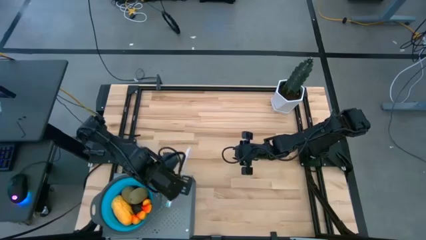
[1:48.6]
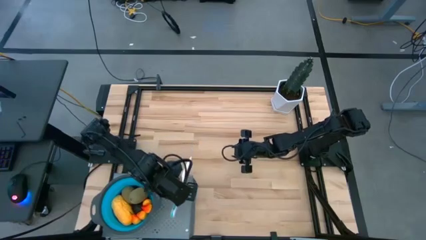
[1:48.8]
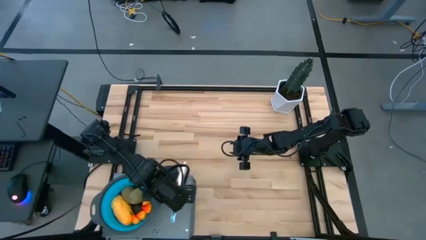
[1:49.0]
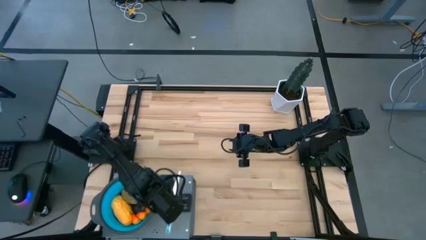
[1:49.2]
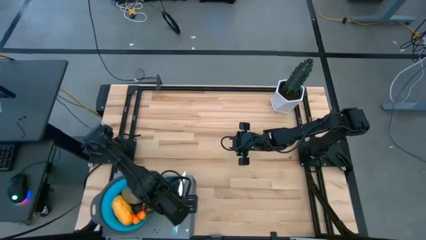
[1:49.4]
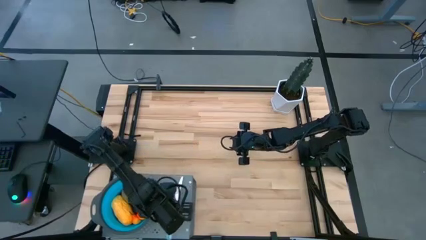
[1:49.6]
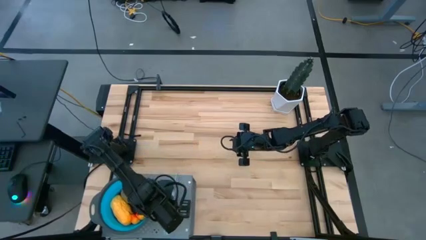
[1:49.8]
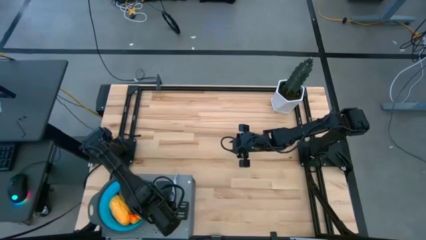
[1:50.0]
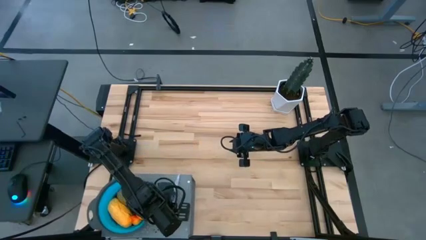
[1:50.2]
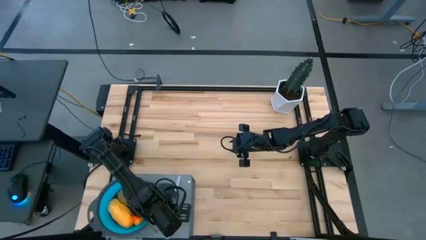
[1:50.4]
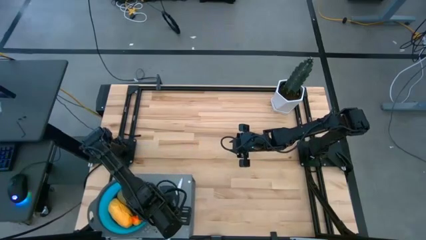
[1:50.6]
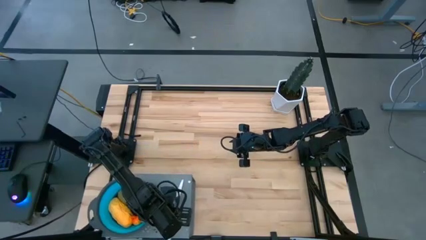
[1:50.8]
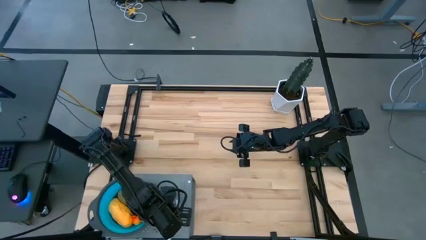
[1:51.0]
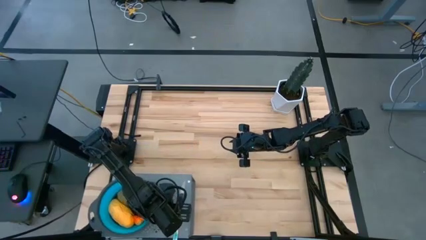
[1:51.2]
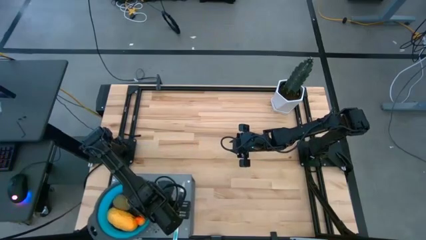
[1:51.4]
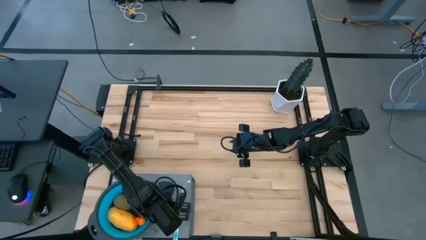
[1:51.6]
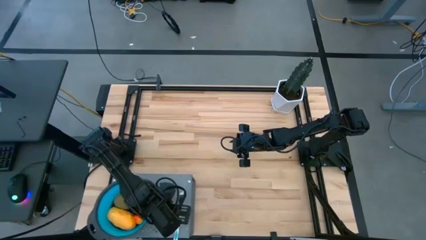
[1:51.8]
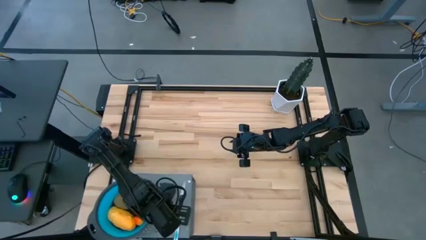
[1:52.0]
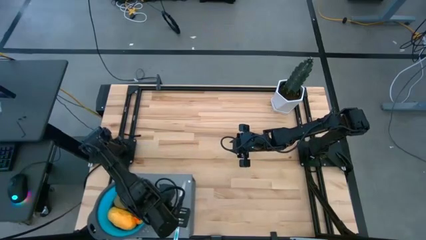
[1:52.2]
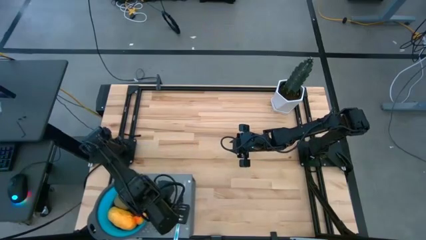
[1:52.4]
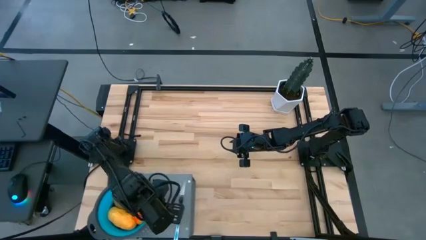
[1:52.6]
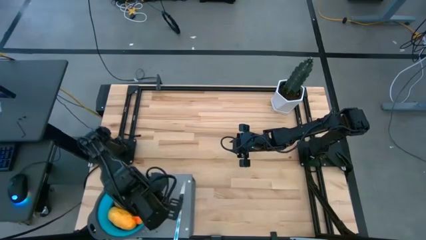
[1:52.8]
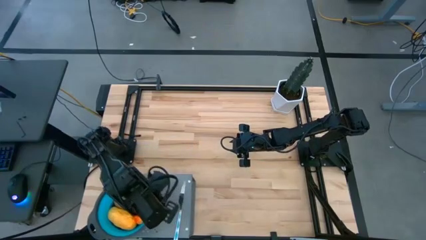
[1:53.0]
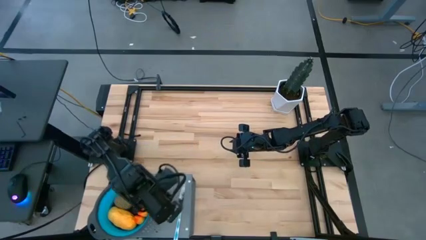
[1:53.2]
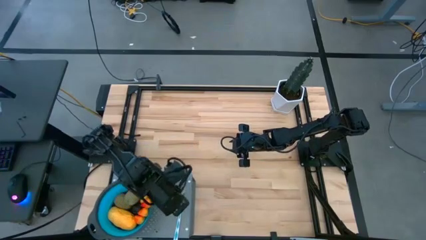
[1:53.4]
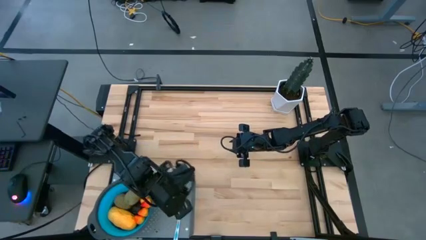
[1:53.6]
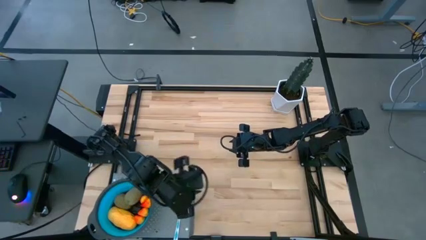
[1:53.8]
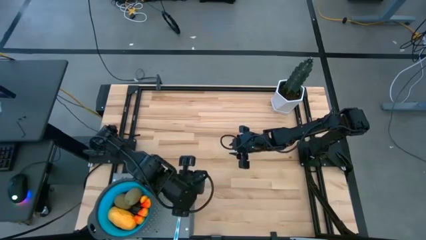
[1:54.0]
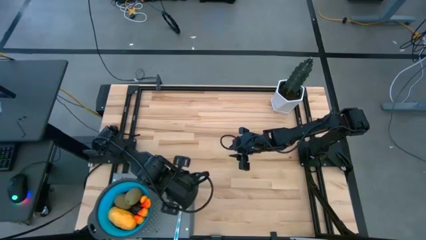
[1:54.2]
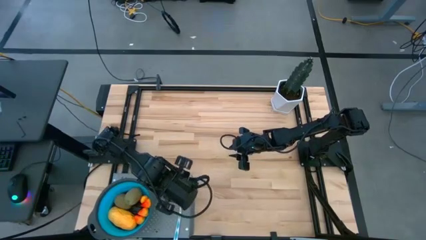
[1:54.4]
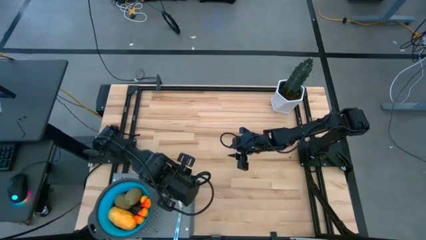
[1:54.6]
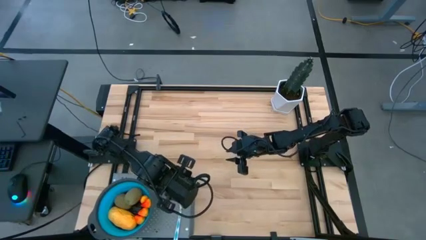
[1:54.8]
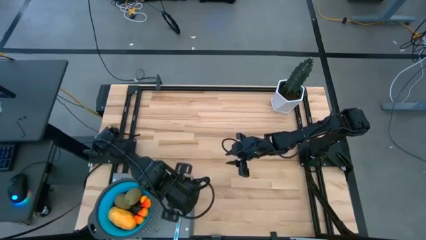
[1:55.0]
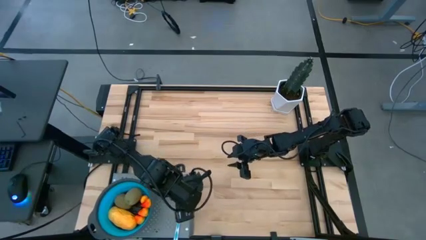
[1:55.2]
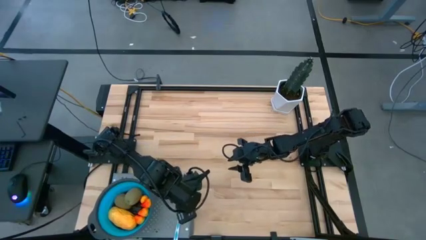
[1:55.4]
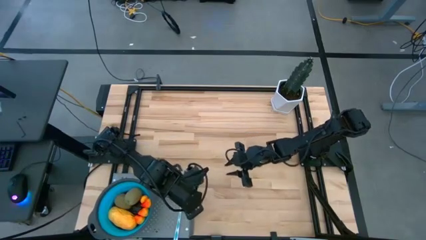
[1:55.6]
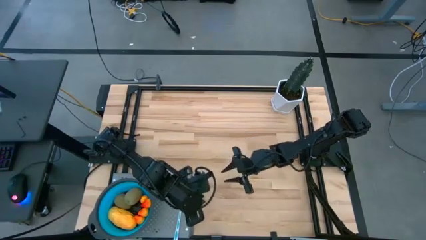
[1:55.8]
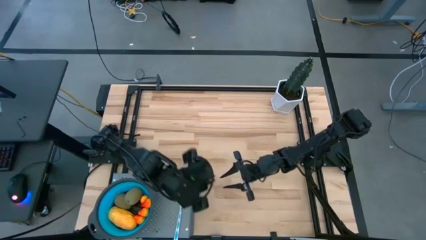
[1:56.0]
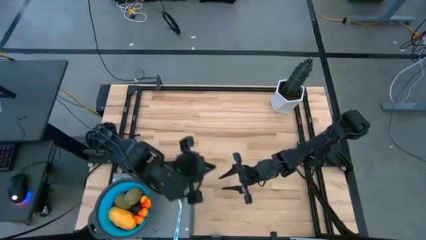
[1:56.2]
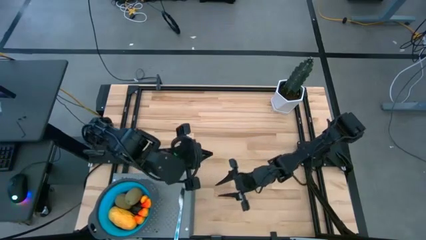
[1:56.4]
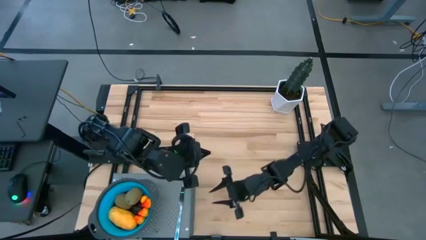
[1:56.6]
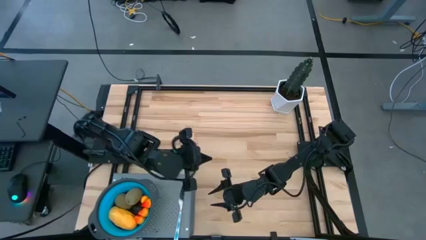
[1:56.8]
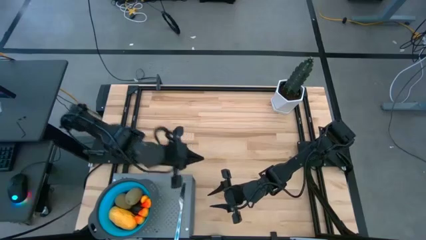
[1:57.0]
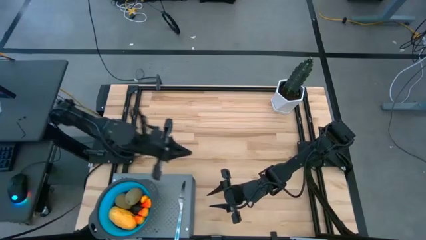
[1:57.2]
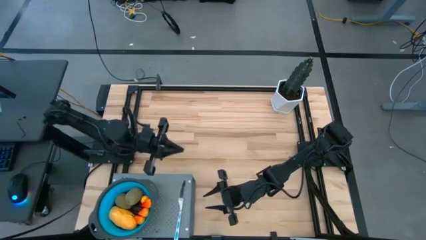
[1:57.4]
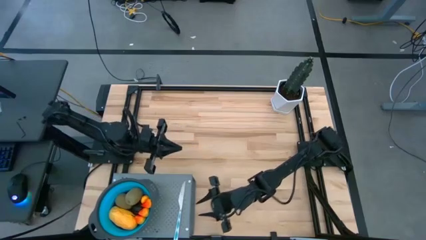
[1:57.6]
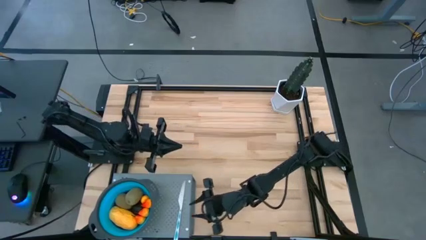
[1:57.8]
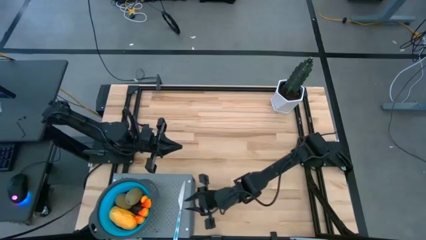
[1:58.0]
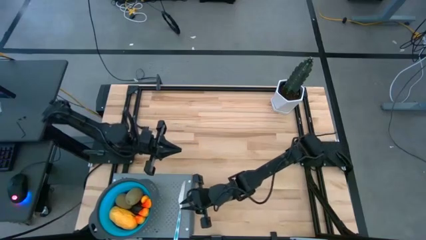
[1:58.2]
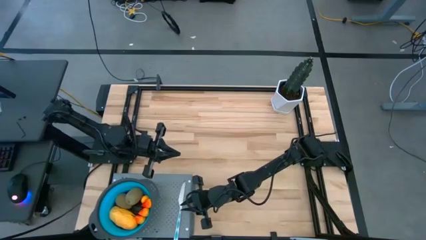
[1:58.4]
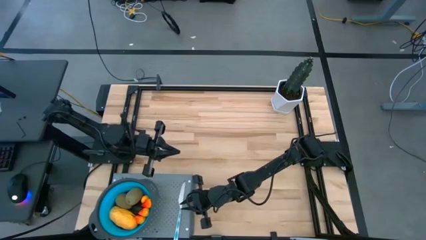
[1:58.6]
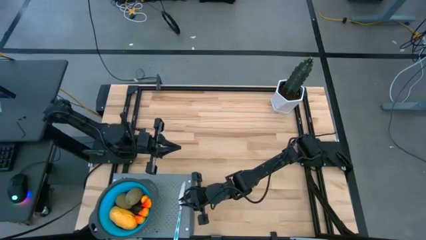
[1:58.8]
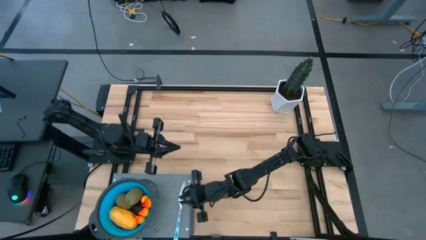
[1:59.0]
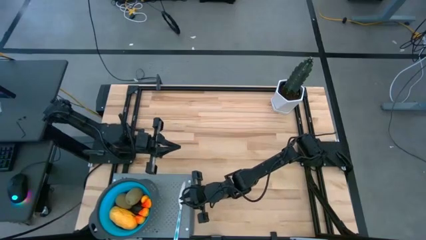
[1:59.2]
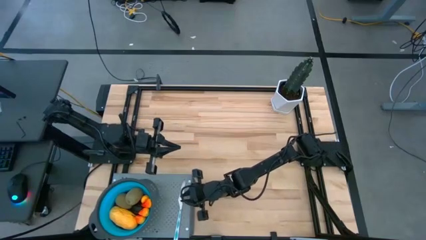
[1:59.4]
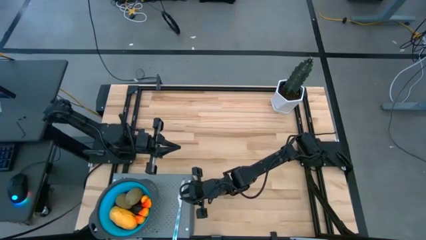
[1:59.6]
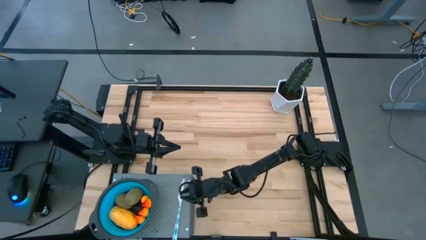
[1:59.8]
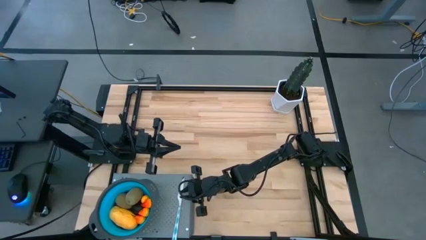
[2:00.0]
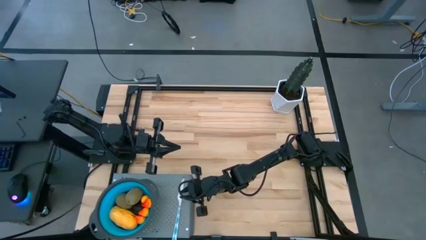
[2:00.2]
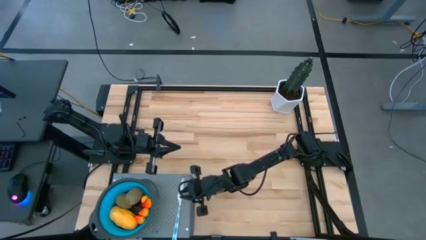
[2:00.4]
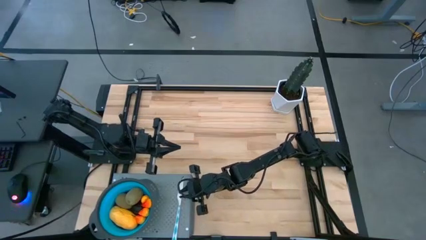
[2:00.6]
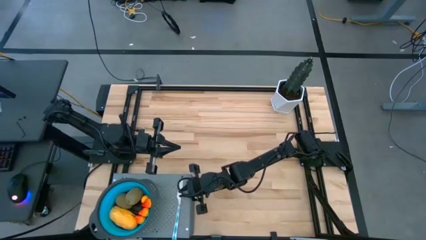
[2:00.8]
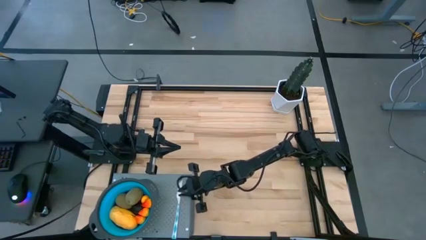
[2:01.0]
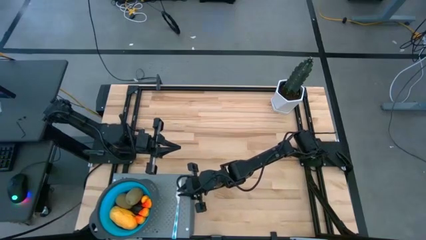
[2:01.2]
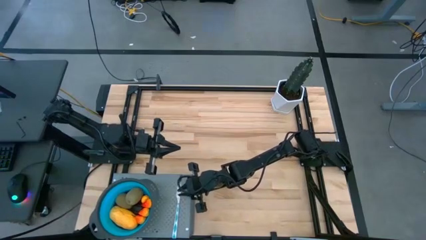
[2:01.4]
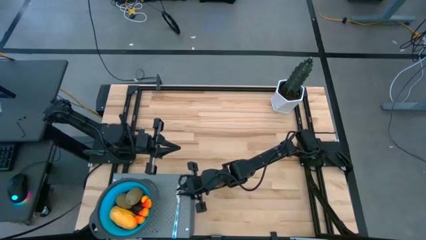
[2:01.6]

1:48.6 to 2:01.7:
Task: Pick & Place Fruit
Put the knife on the shelf

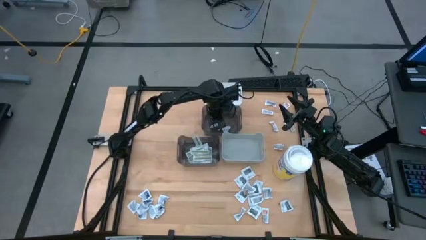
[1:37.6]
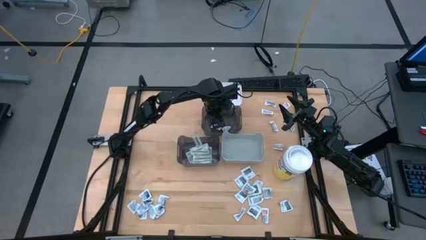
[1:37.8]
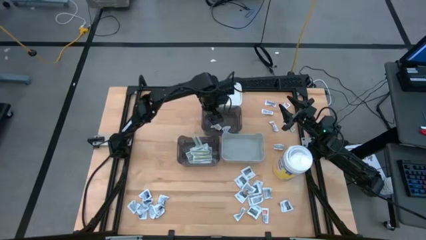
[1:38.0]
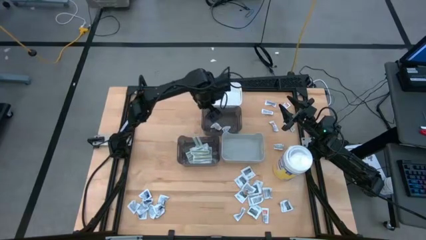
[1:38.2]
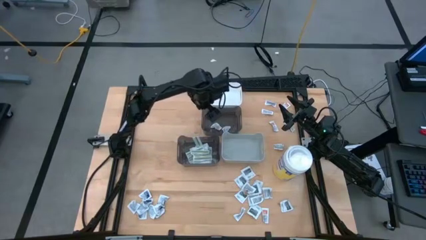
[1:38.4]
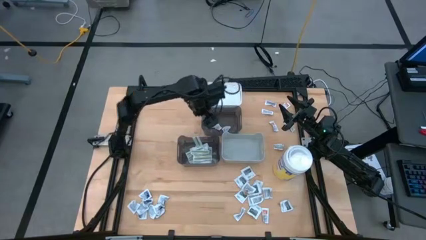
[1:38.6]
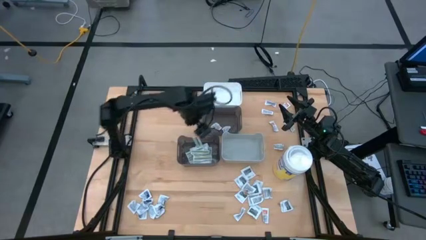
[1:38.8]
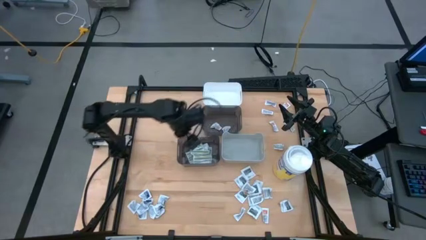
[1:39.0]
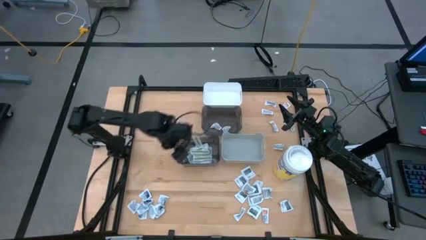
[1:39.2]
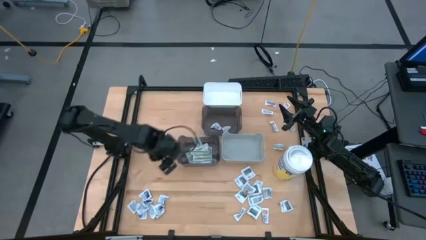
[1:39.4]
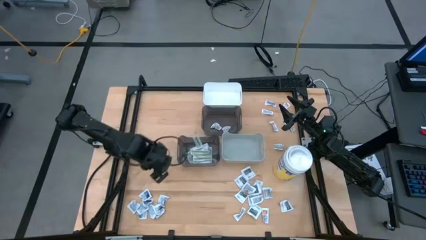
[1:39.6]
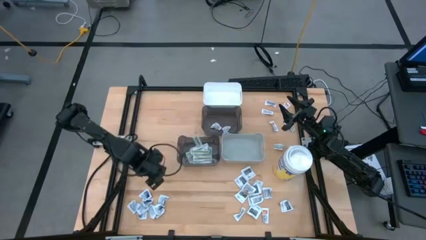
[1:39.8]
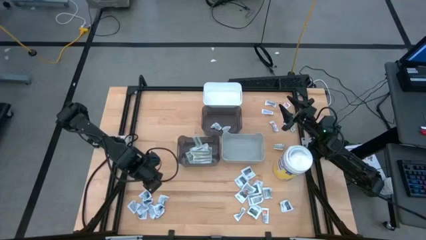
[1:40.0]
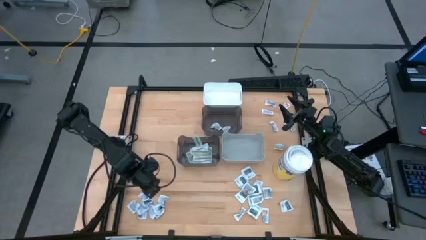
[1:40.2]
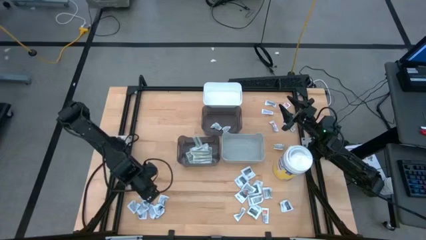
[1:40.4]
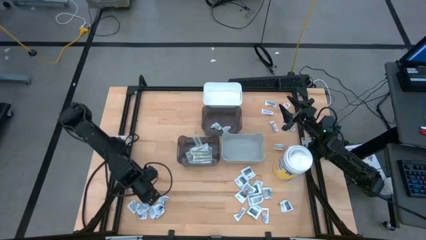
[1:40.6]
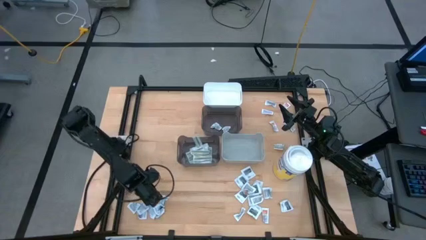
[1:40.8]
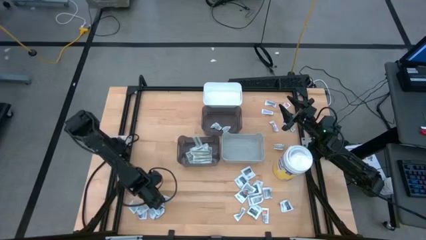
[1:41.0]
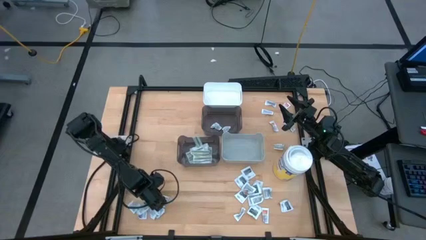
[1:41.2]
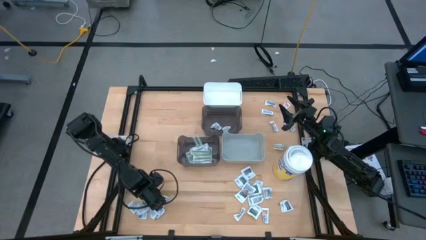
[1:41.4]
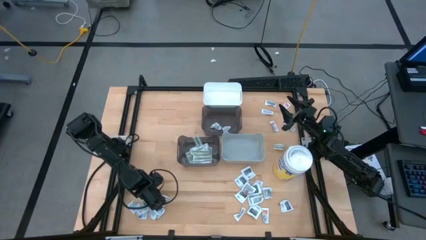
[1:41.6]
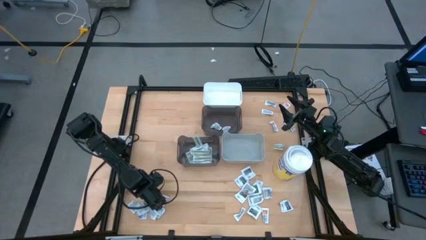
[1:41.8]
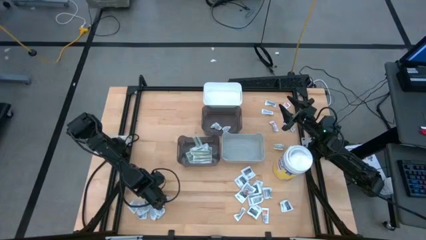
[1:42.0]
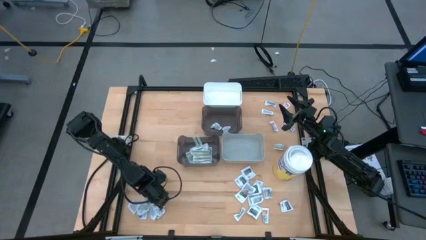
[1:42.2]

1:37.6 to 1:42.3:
Task: Pick & Place First Aid Supplies
Put the white alcohol pad into the top black bin
